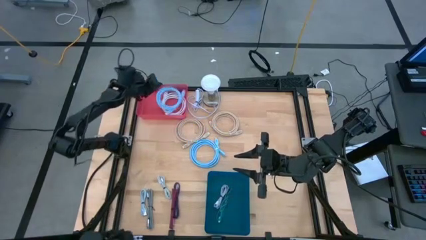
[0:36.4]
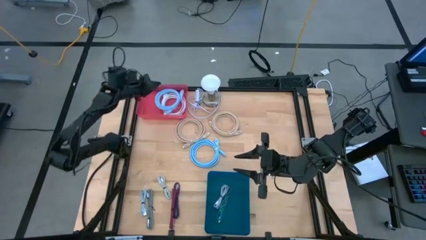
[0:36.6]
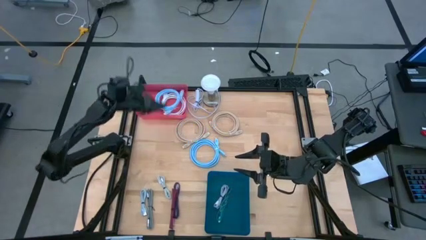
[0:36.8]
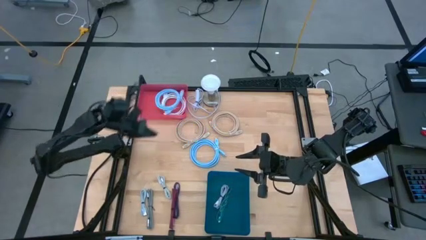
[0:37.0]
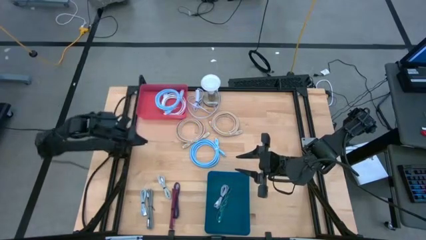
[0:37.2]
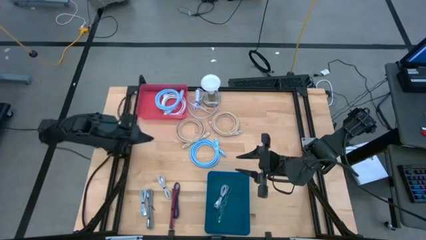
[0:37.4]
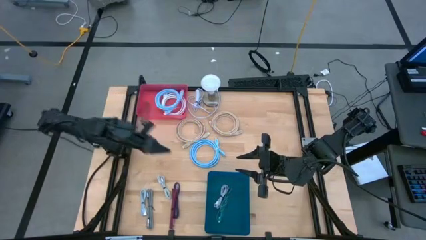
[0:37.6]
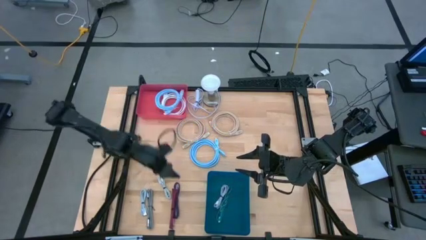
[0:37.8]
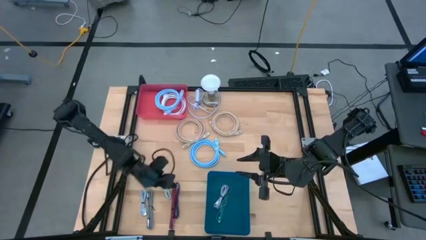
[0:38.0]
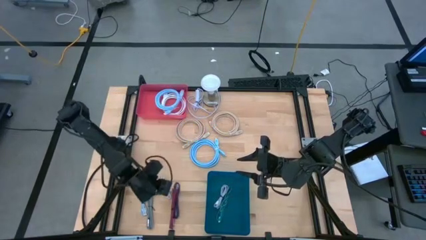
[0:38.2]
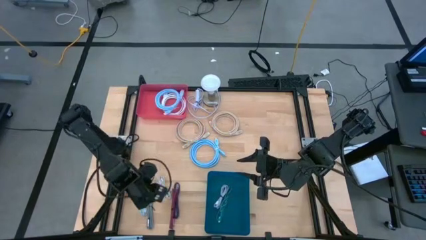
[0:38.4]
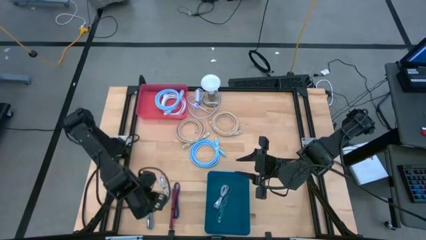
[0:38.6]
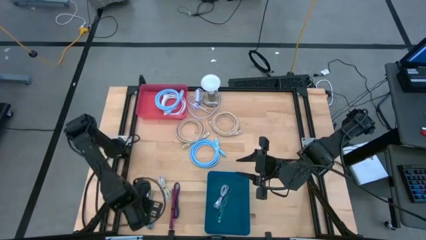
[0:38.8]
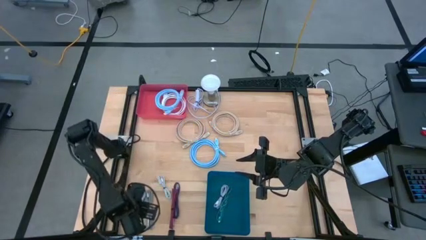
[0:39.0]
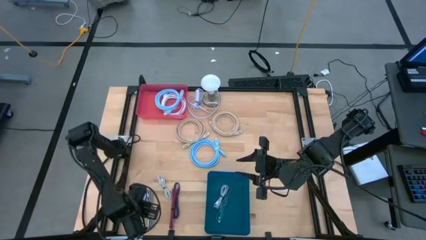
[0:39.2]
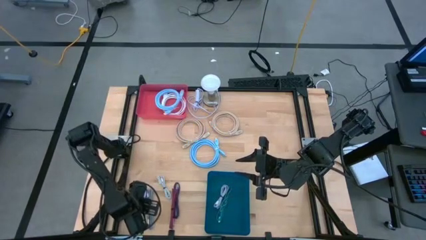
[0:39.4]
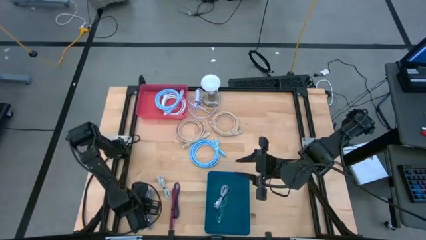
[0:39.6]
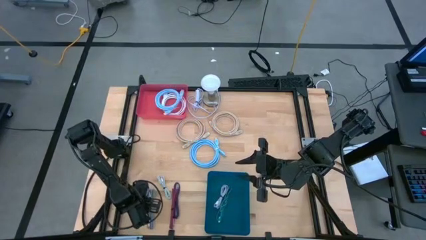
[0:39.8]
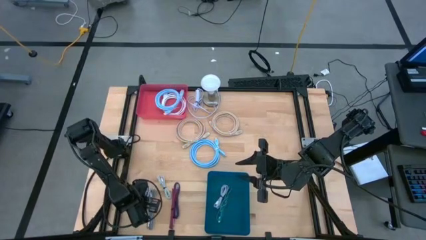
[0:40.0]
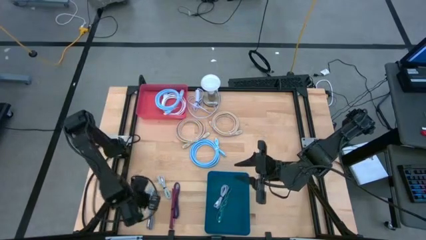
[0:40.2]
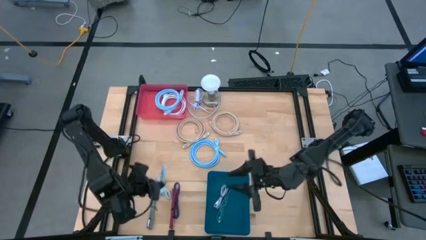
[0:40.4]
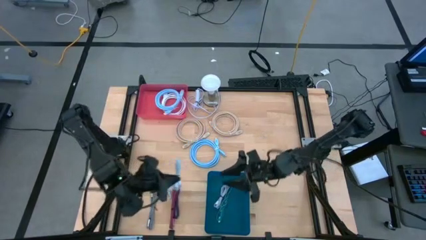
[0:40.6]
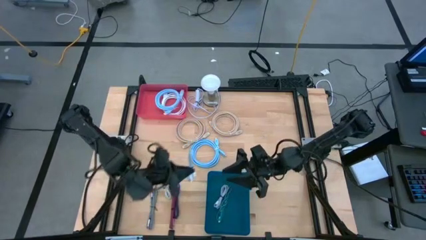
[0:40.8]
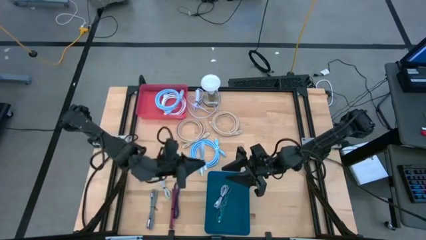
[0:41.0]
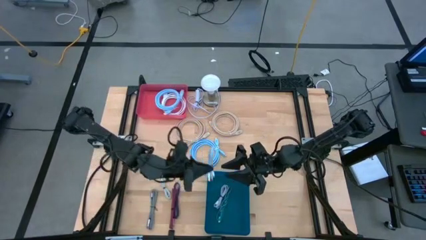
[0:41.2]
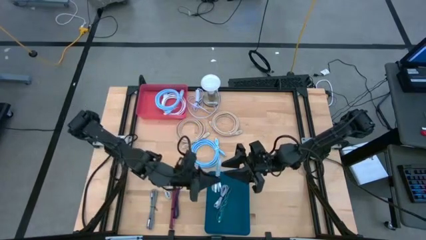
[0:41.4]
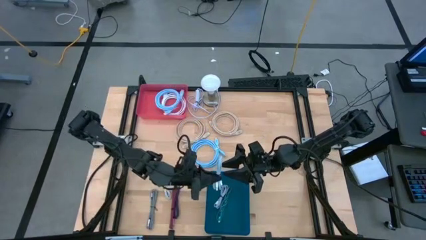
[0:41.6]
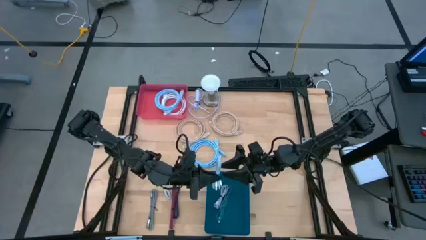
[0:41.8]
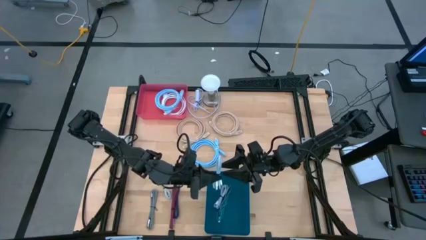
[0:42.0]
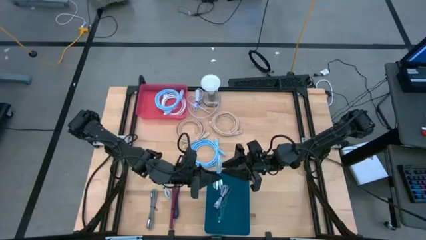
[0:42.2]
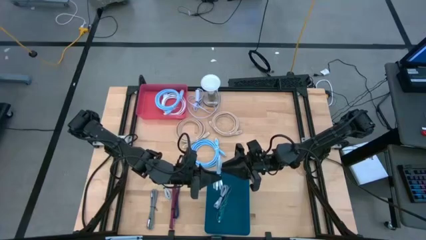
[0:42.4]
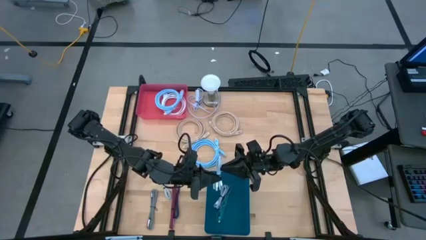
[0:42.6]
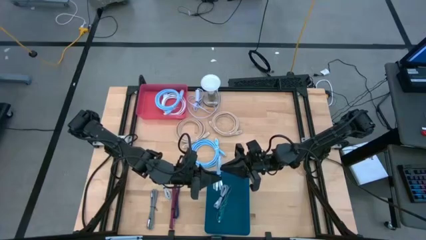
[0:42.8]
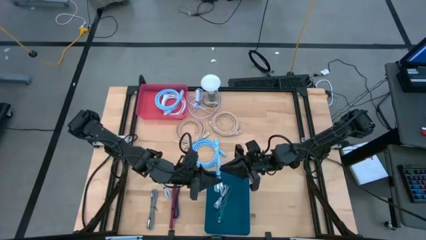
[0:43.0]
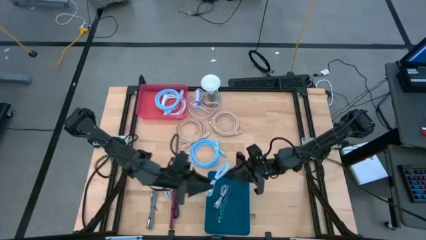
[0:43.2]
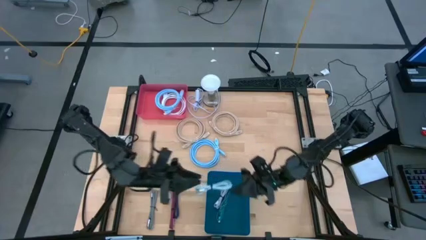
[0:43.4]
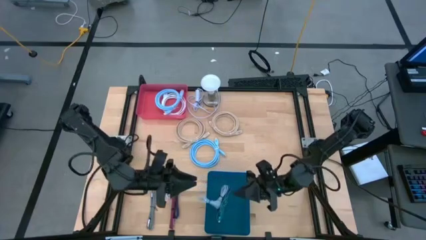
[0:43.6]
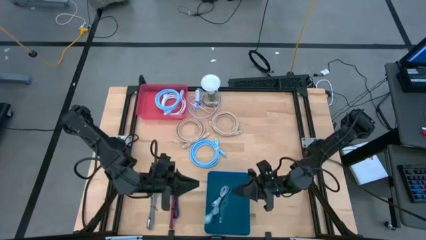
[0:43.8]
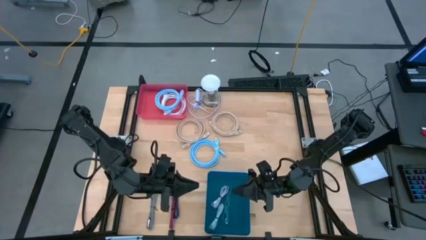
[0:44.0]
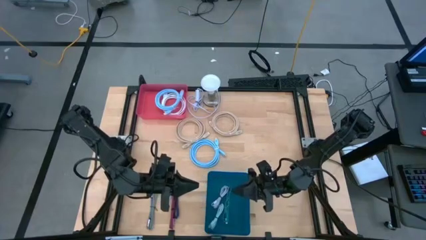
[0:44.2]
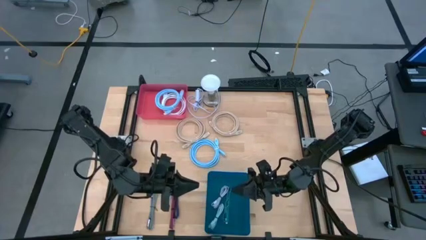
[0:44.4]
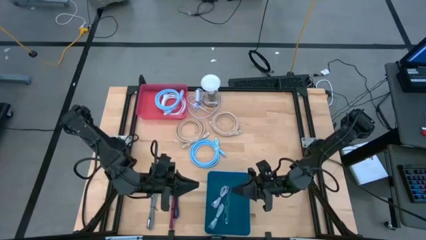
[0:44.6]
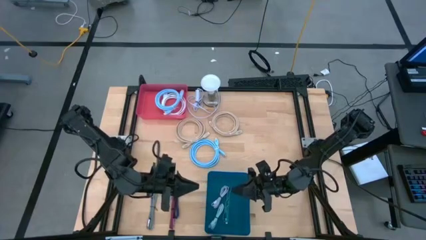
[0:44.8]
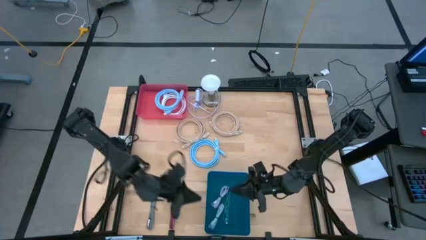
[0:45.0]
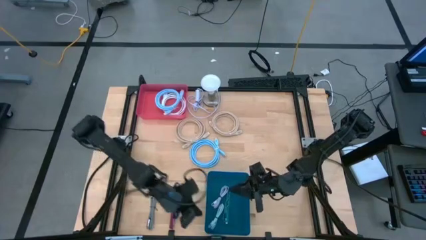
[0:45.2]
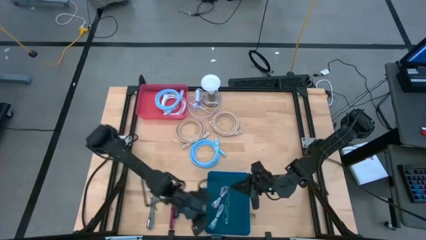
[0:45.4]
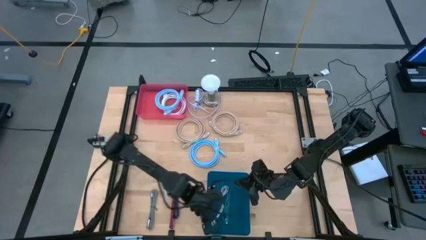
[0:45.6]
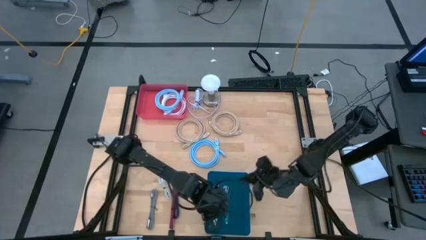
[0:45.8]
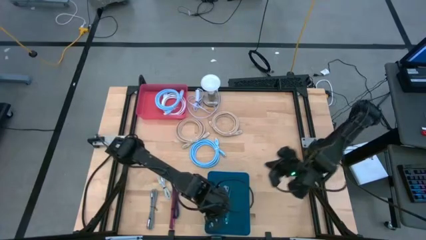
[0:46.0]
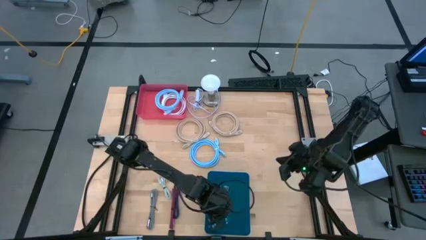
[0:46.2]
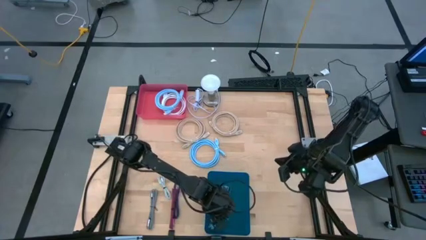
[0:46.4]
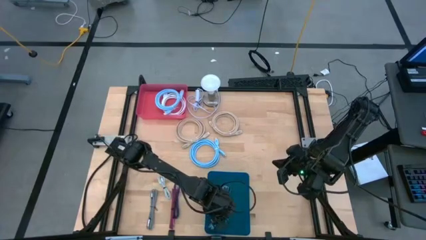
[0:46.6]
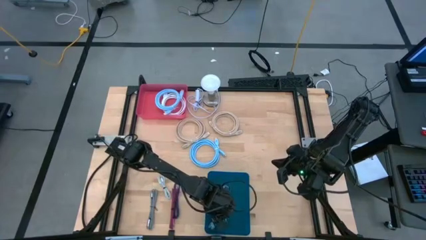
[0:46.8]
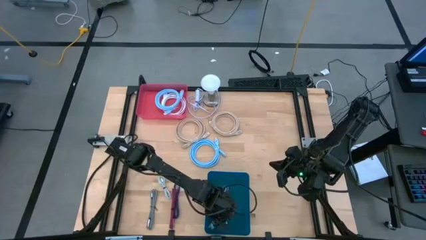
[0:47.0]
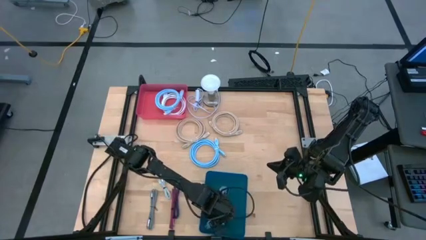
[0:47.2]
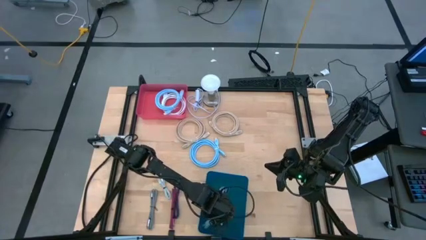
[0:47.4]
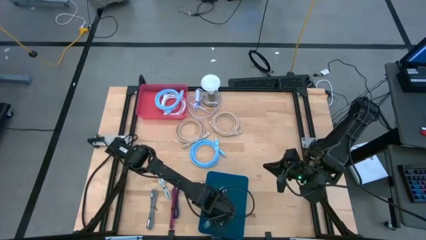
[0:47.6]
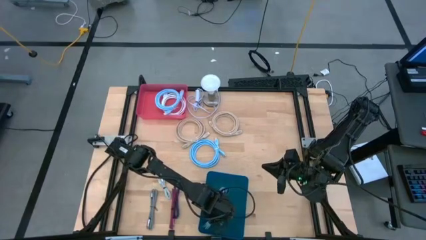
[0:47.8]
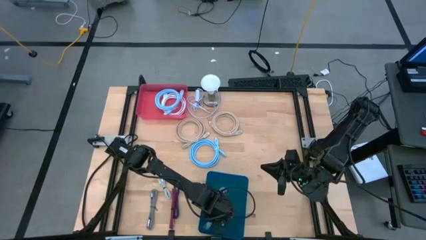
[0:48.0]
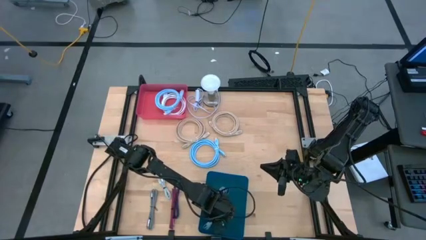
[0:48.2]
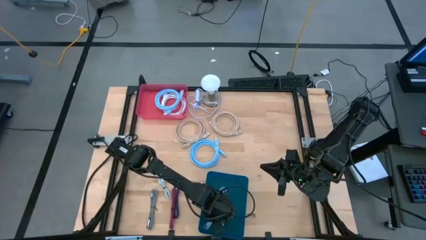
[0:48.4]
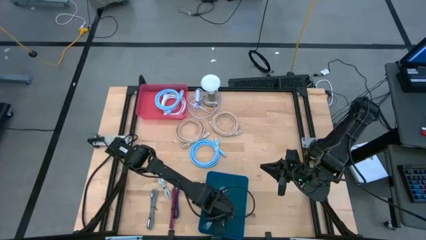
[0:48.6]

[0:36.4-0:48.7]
Task: Pick & Place USB Port
Put the light blue USB cable into the blue bin

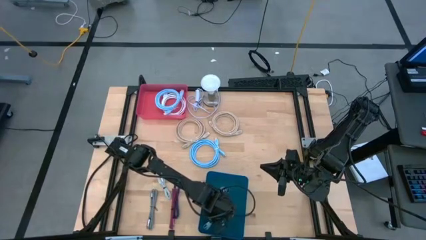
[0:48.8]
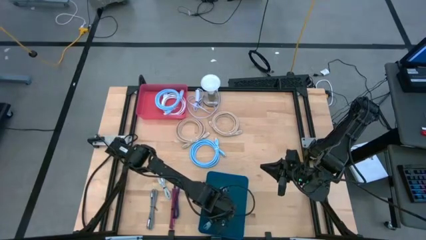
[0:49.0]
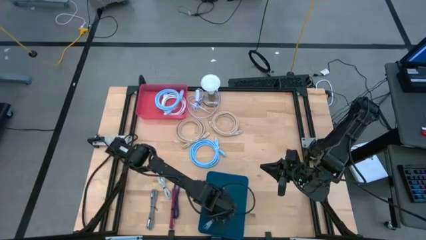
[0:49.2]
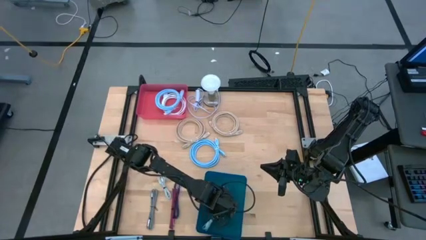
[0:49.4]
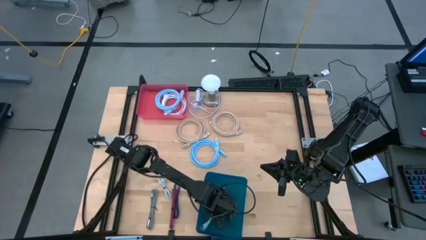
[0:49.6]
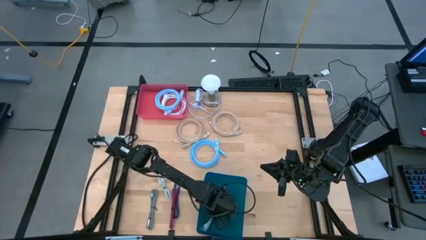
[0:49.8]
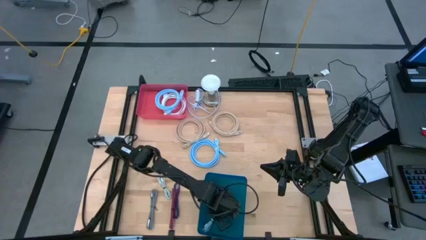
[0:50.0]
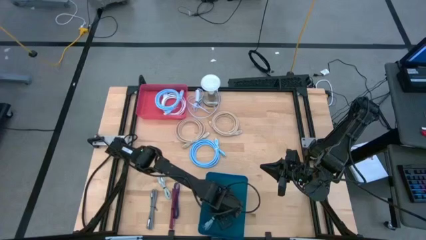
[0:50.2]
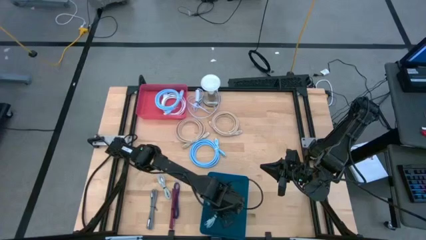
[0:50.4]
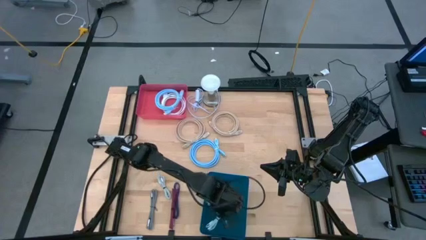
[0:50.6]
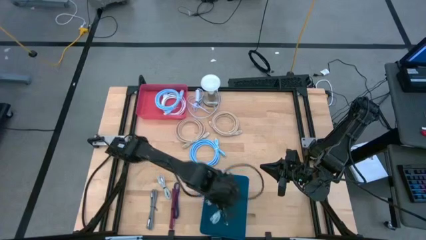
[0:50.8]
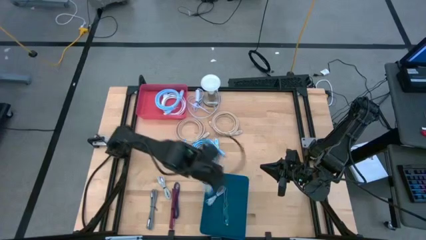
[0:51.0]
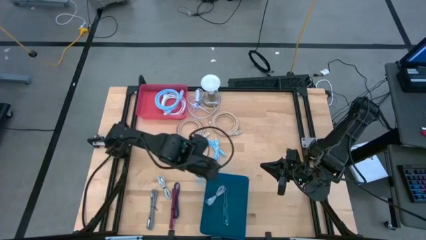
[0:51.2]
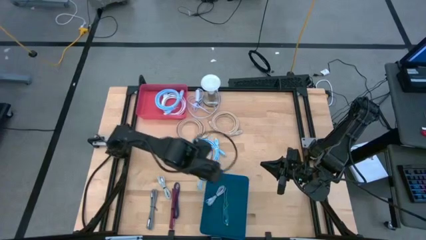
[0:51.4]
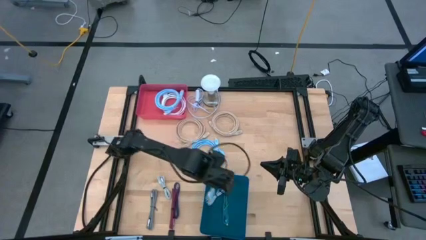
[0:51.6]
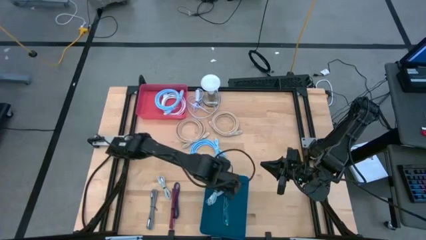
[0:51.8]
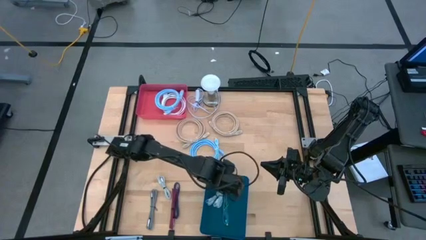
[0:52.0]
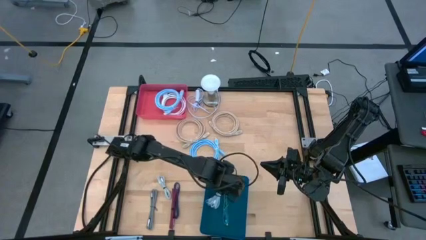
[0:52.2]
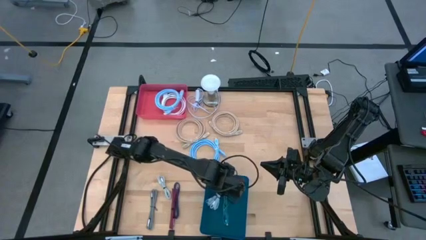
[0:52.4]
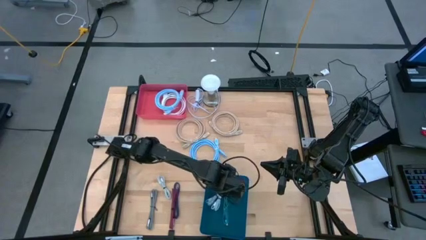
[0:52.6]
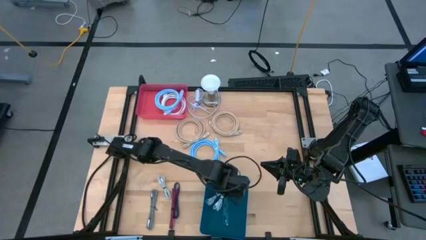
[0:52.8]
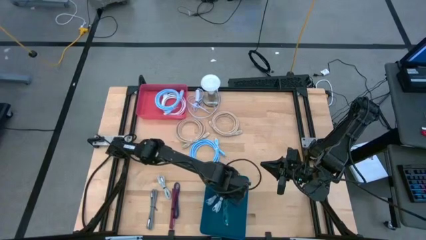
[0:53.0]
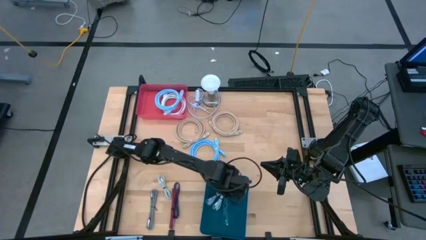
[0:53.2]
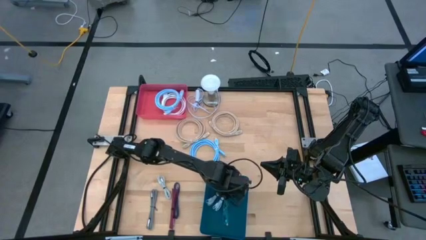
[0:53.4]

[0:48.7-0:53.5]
Put the light blue USB cable into the blue bin

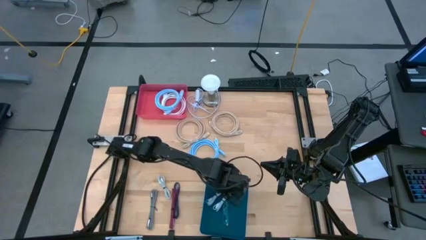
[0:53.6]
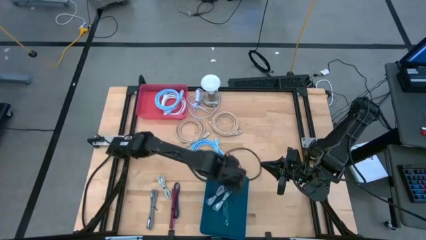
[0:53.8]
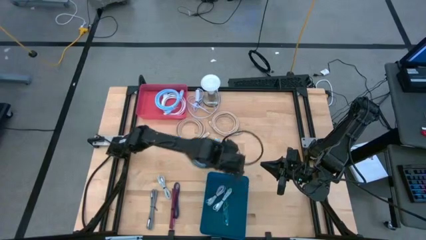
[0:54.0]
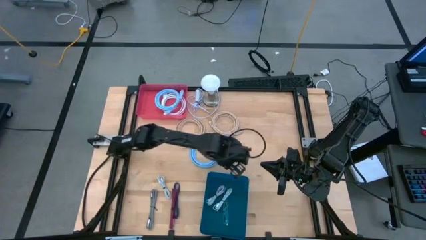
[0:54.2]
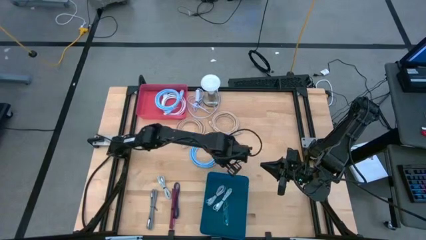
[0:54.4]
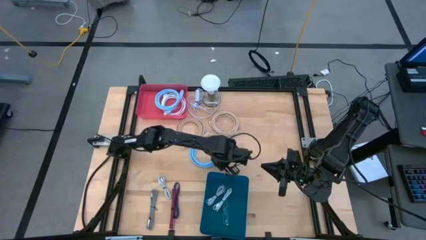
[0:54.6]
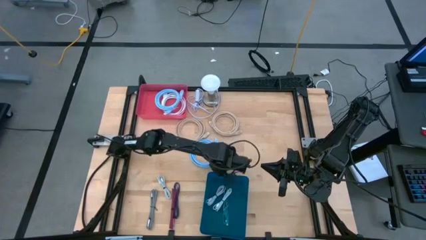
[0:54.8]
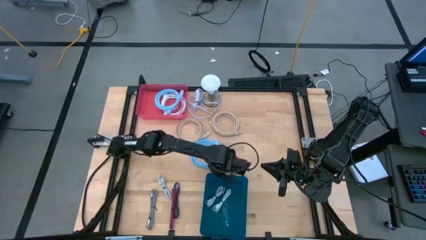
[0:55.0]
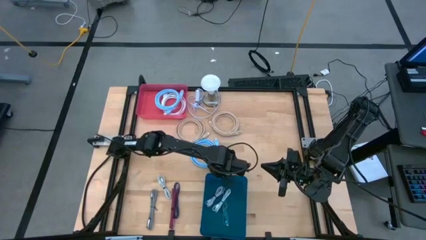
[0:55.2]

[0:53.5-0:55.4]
Adjust the blue bin on the table
